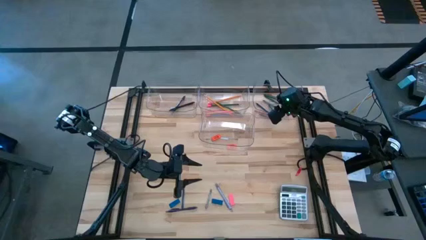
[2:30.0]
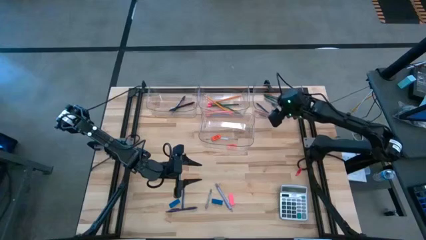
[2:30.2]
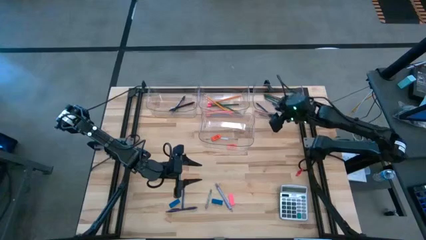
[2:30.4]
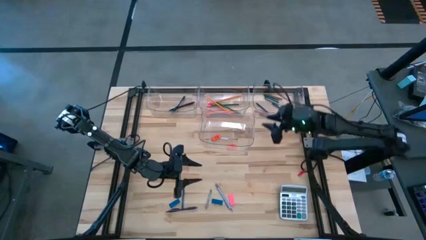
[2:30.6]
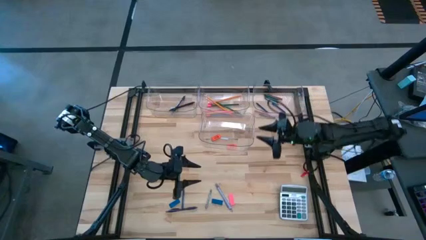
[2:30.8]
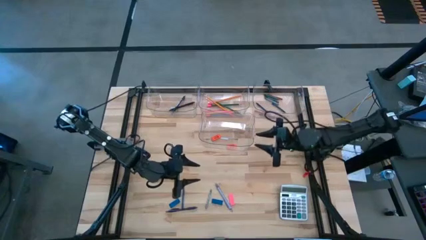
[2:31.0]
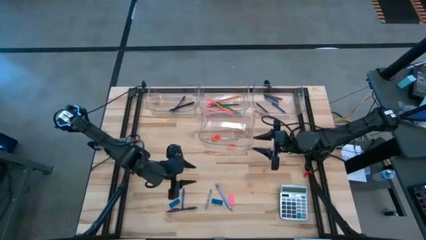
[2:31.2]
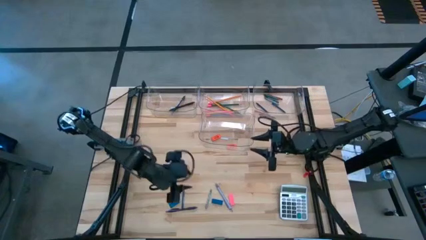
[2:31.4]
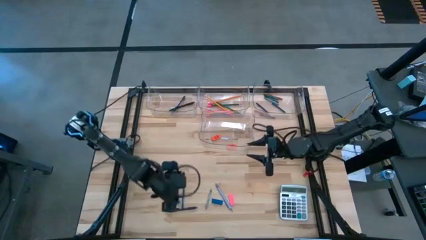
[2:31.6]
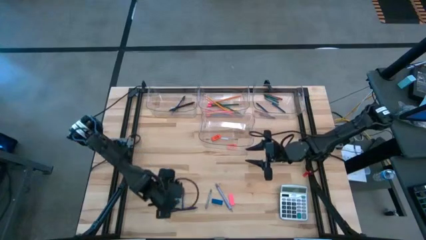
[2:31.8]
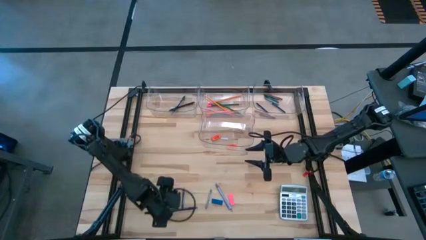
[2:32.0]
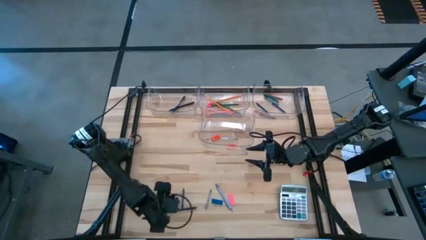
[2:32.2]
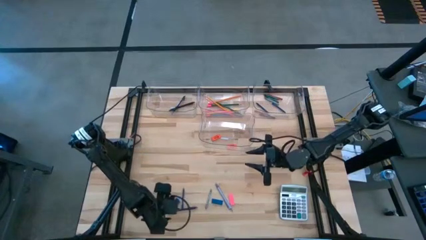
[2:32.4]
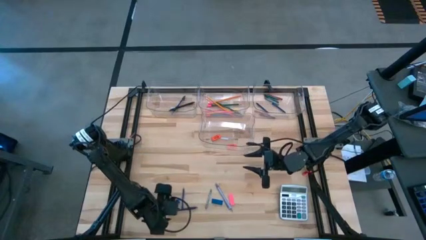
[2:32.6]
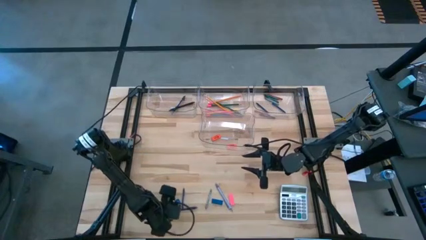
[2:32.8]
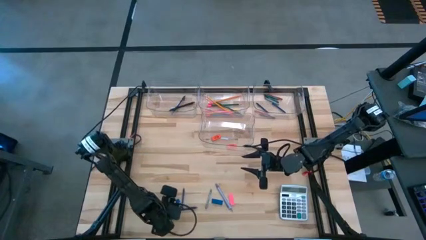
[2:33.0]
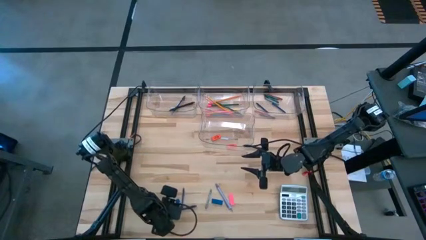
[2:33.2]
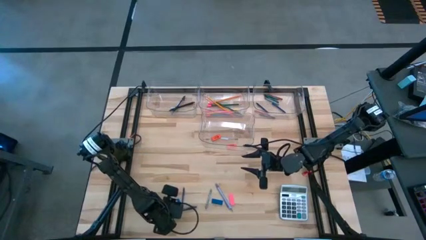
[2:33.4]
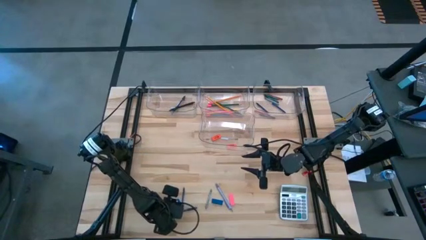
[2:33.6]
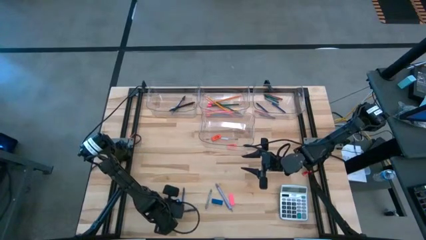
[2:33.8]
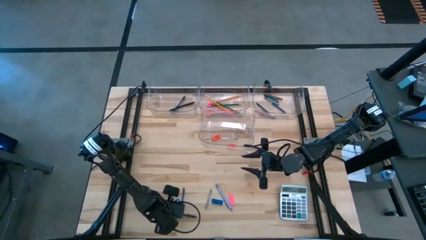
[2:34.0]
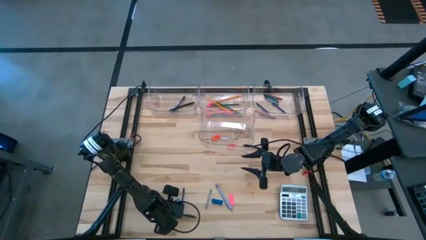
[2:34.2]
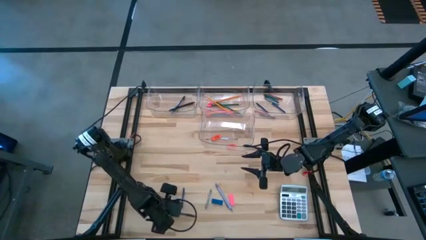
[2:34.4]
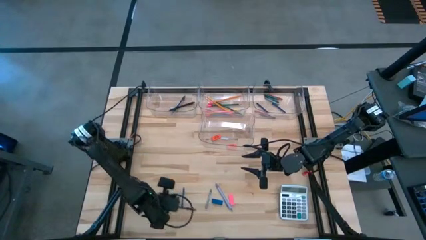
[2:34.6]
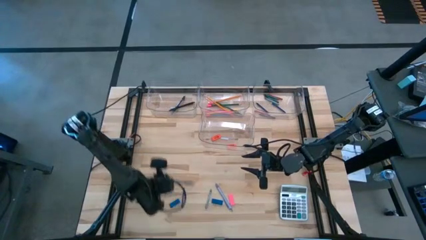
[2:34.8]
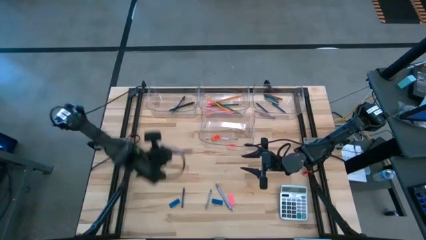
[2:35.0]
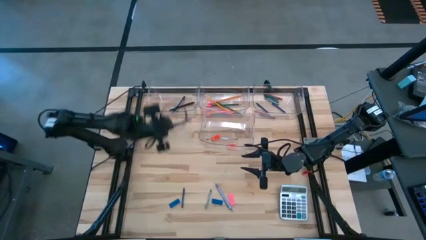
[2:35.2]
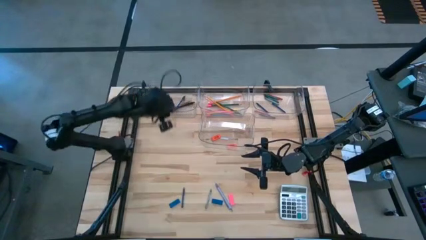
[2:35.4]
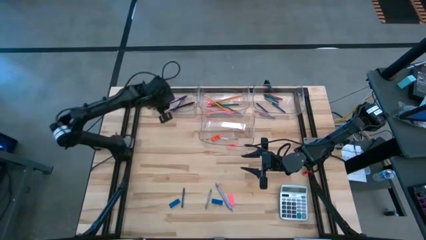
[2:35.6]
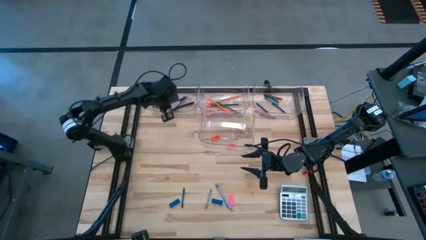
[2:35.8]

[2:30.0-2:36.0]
Task: Sort crayons/erasers/pens/pencils in bins
Put the black pen into the top left transparent bin

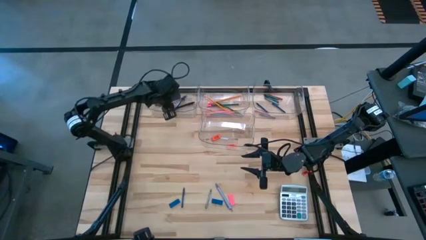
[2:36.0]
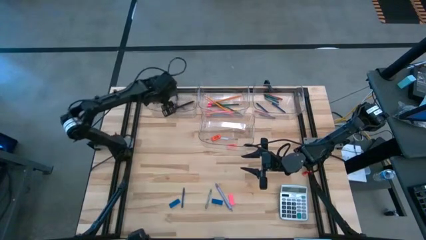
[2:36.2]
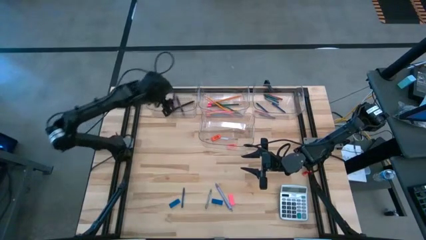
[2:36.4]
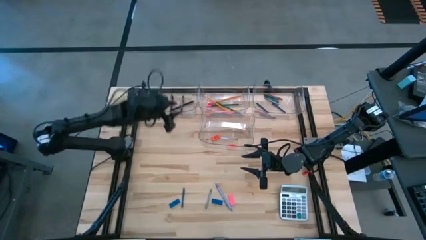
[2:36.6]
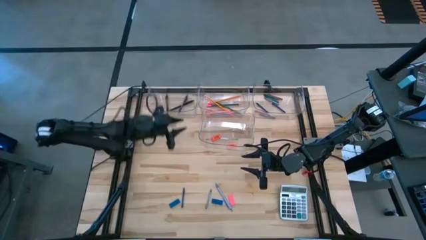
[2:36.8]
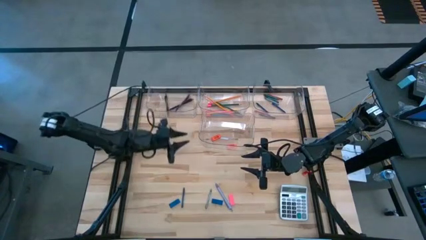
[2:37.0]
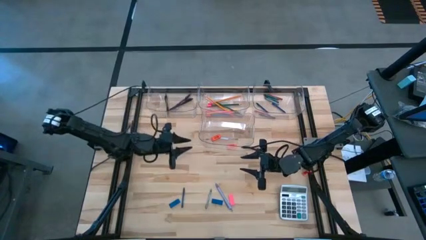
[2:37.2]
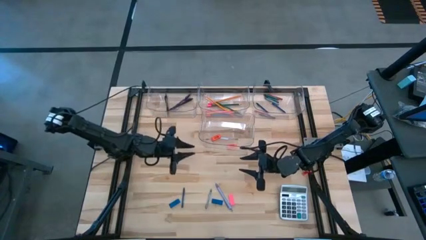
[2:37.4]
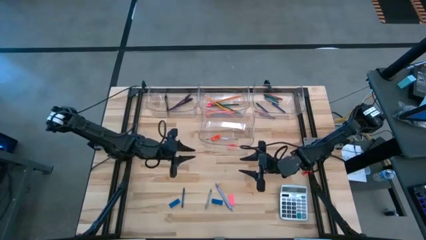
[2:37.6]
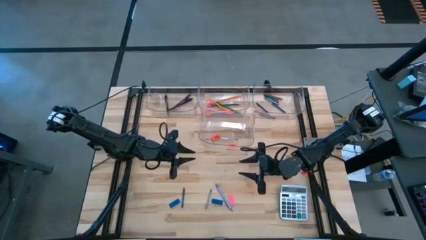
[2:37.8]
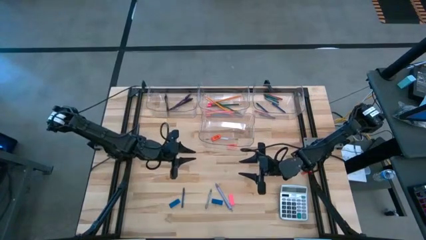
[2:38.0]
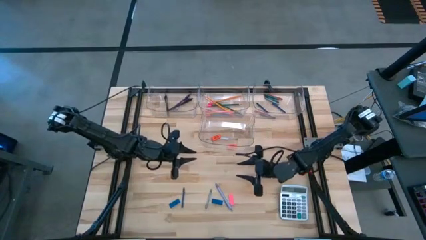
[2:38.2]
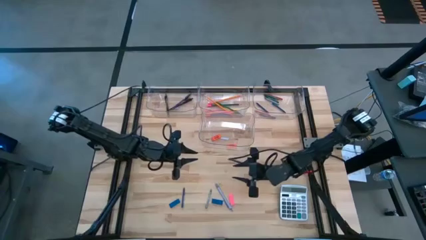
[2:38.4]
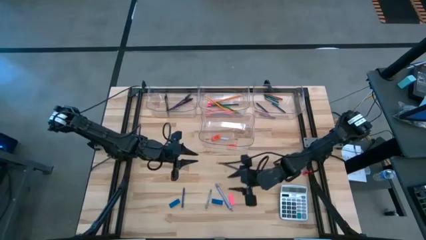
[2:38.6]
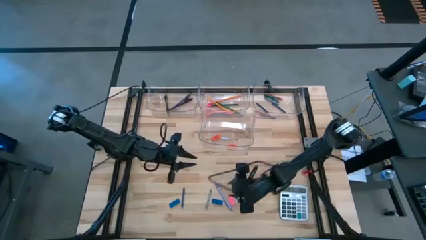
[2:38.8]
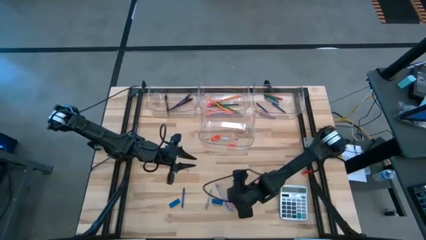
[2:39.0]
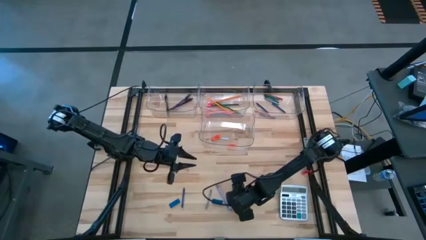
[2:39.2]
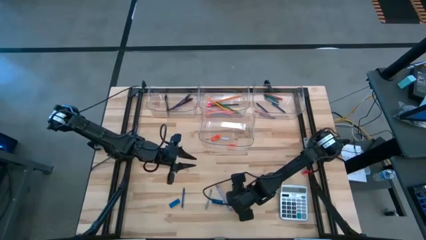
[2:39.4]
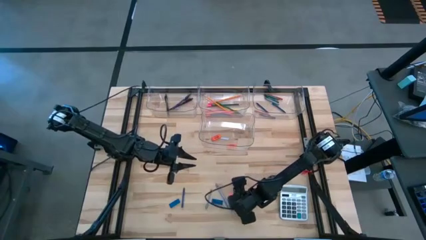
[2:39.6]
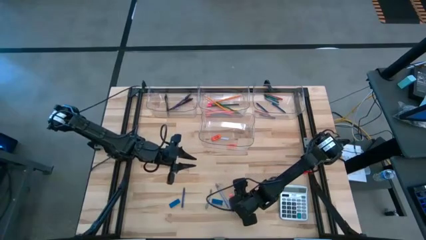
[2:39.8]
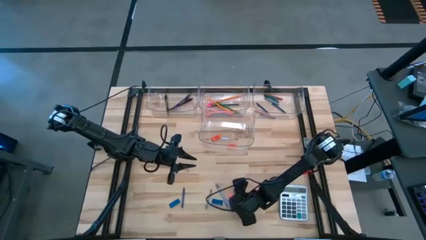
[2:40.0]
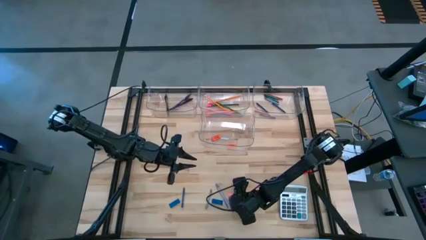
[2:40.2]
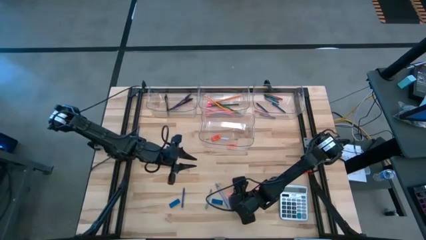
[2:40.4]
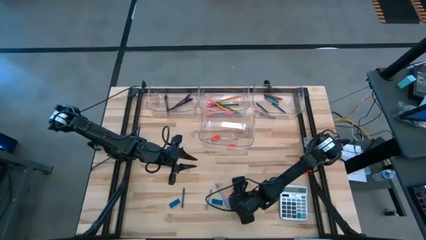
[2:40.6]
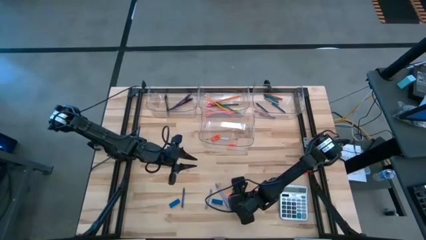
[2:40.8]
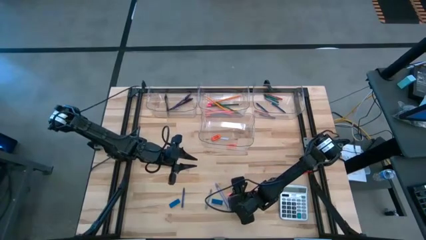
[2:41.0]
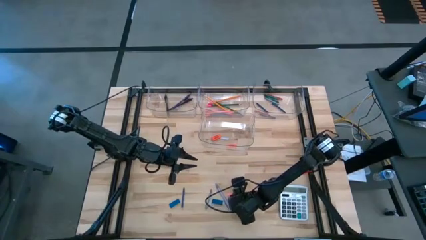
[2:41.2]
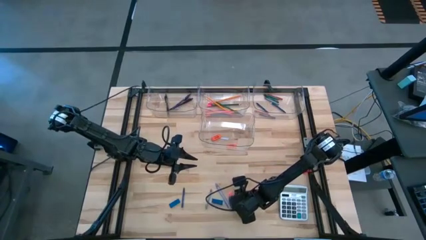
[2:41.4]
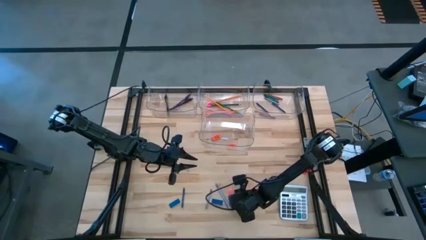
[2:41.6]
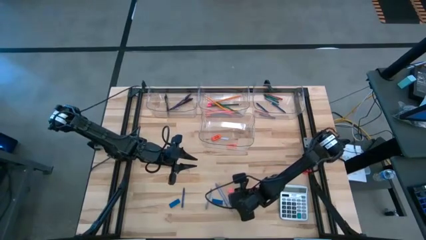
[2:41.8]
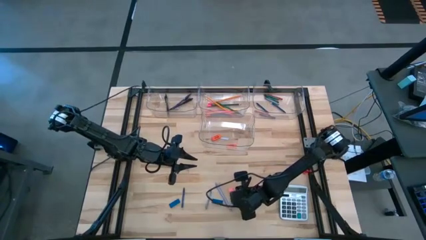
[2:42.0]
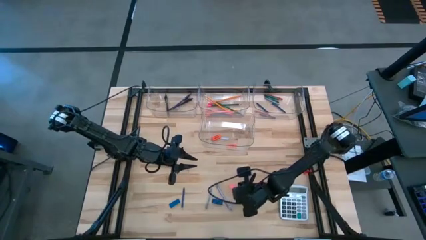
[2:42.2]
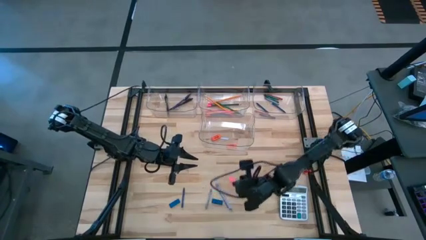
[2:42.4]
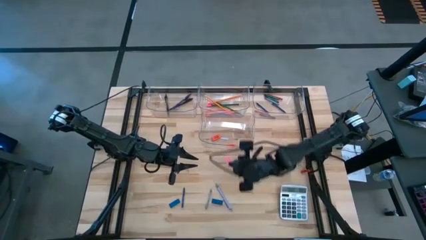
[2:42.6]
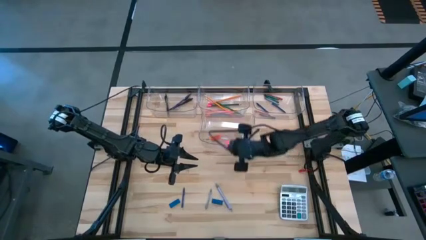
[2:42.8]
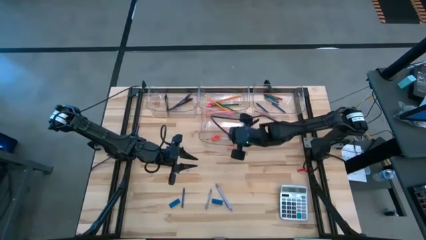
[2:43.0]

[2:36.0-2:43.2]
Put the pink eraser into the bottom transparent bin

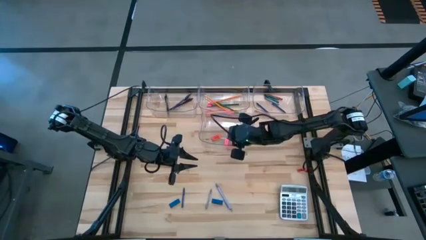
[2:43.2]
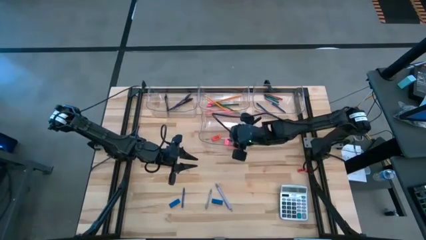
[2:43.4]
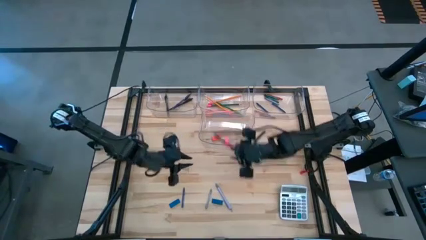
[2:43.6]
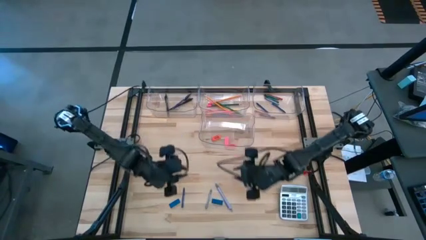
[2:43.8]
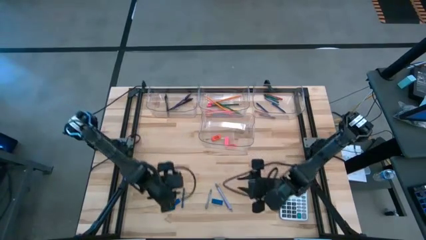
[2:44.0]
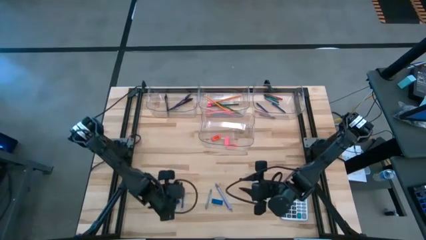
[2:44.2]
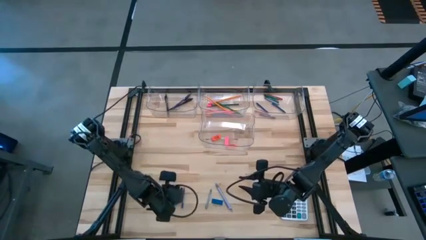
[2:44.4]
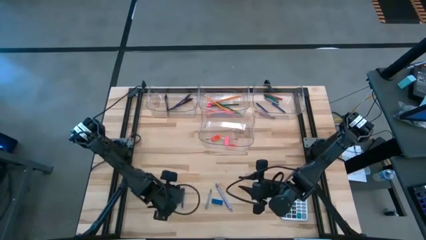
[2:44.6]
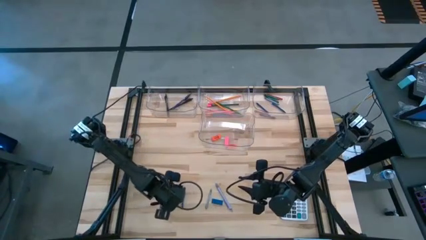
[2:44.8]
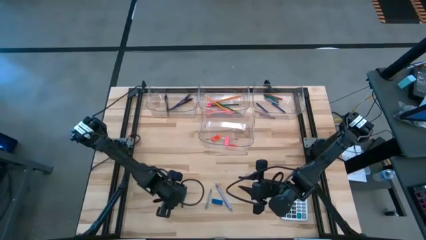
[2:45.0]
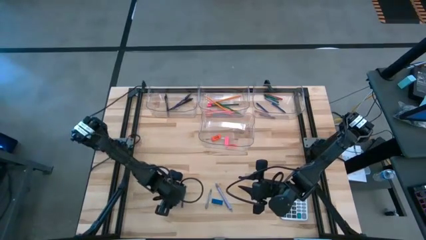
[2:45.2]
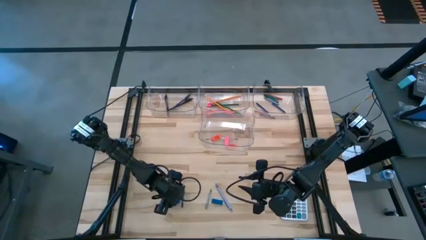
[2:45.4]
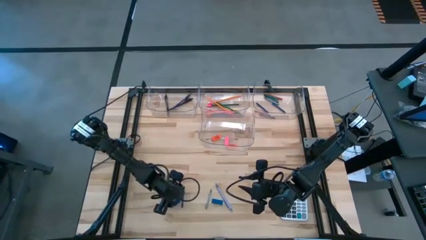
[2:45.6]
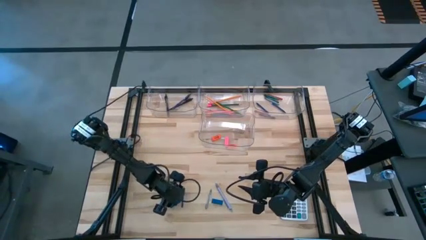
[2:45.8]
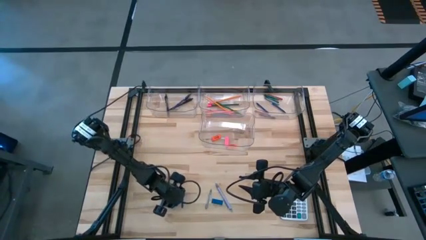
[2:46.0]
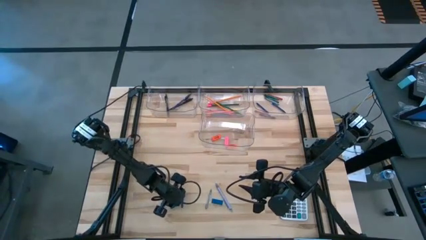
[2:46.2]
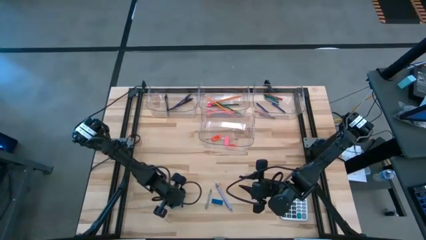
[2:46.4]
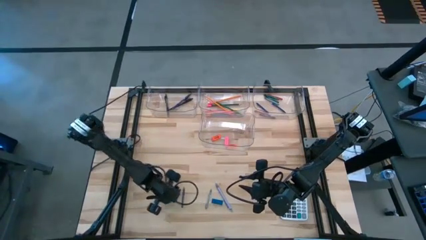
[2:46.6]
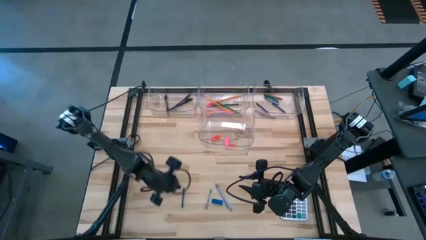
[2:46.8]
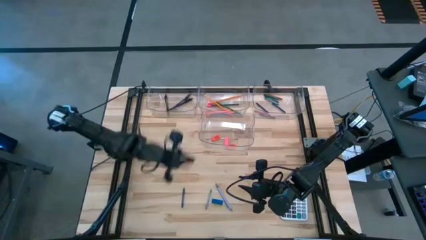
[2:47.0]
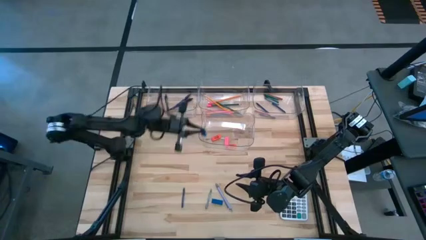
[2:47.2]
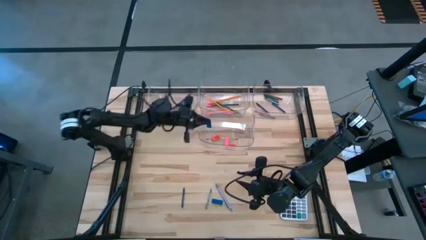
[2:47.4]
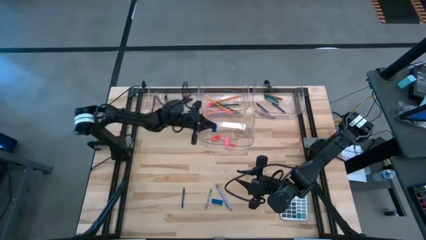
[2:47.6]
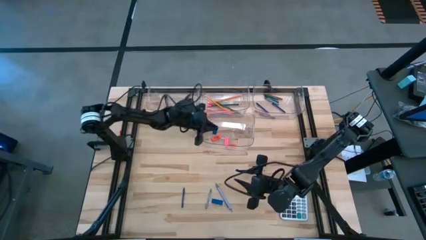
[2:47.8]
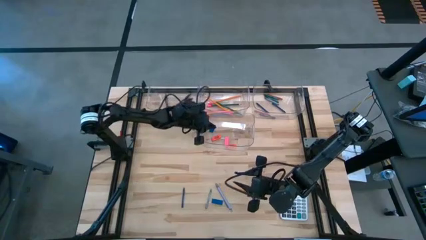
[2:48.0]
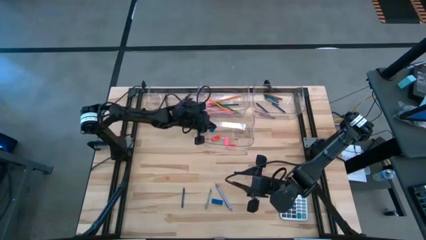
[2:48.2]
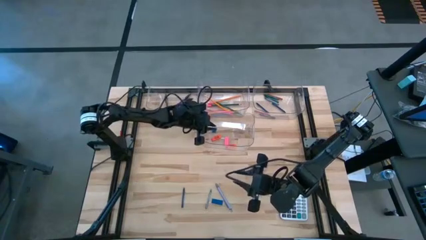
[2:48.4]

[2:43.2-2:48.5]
Put the blue eraser into the bottom transparent bin
